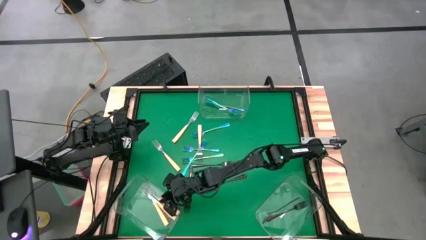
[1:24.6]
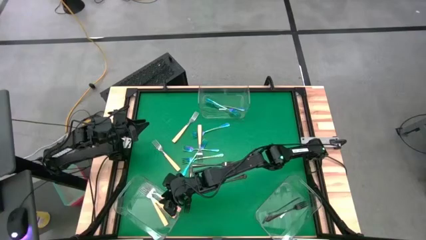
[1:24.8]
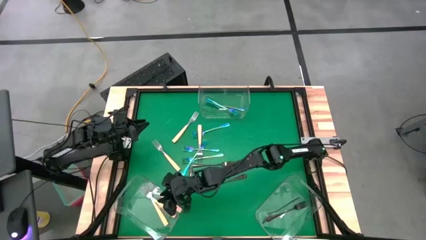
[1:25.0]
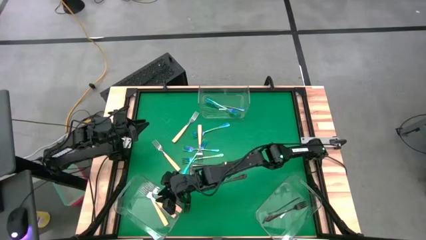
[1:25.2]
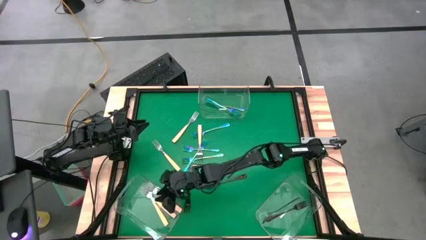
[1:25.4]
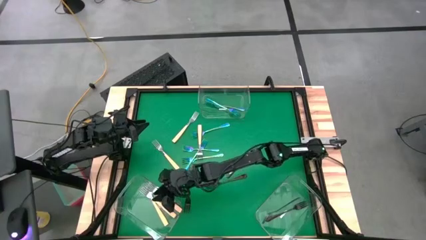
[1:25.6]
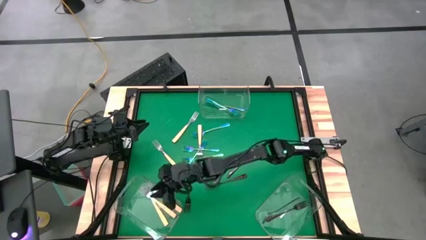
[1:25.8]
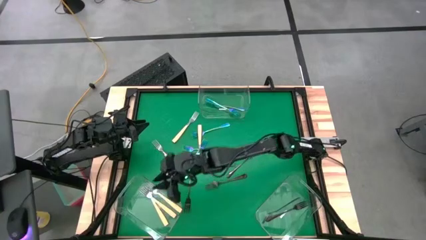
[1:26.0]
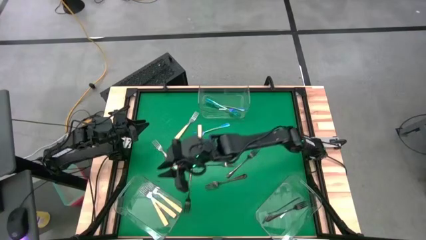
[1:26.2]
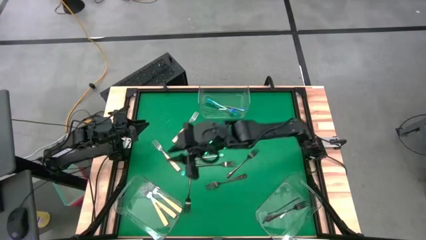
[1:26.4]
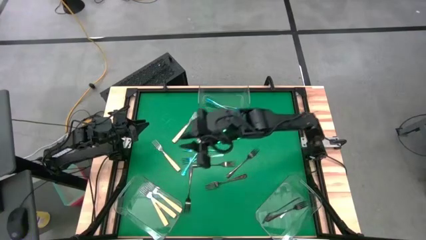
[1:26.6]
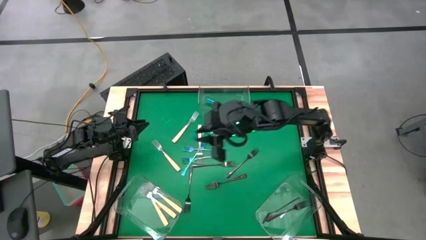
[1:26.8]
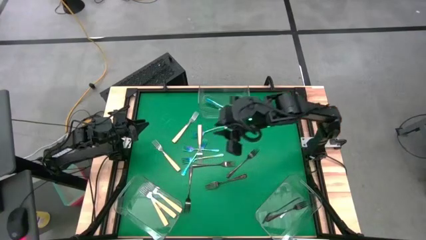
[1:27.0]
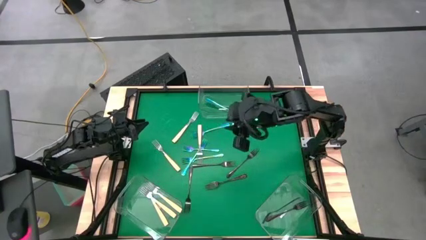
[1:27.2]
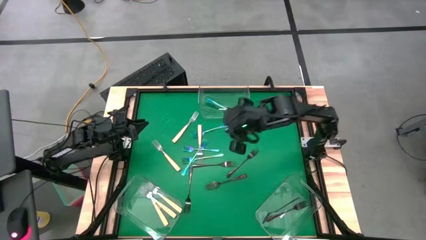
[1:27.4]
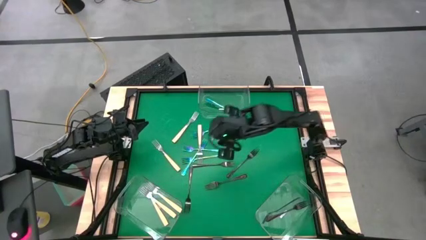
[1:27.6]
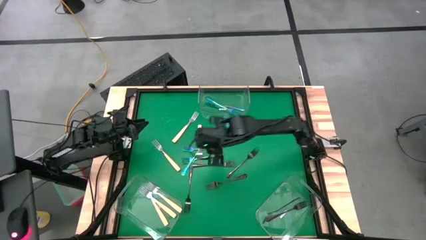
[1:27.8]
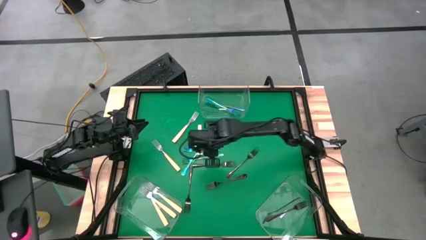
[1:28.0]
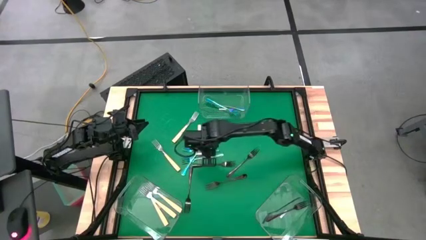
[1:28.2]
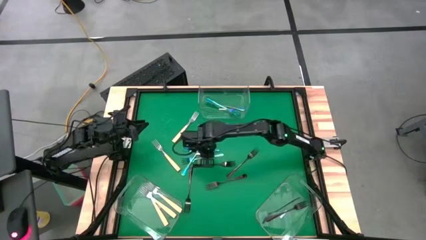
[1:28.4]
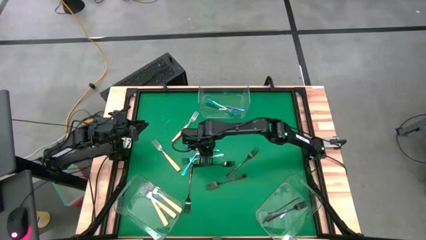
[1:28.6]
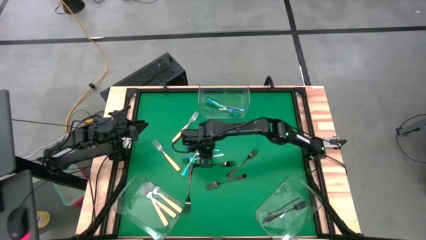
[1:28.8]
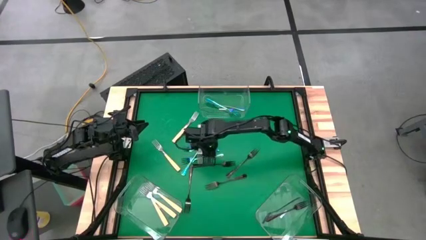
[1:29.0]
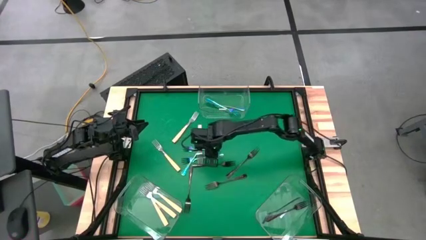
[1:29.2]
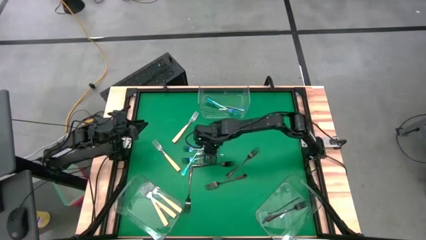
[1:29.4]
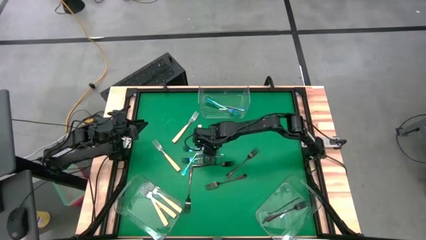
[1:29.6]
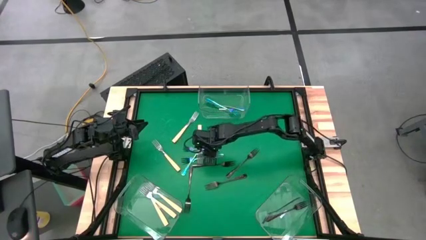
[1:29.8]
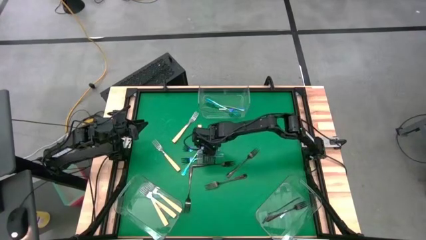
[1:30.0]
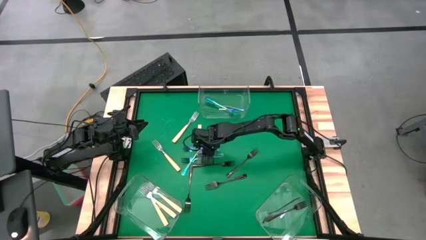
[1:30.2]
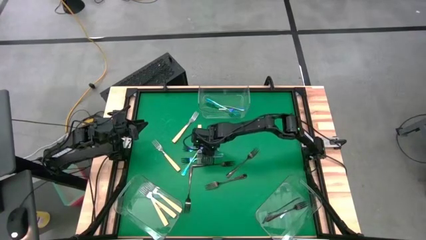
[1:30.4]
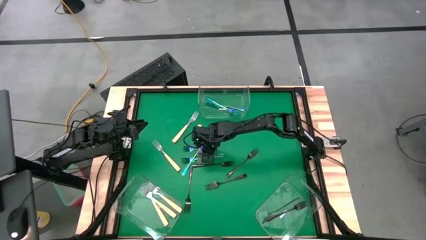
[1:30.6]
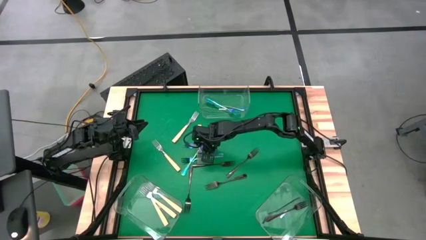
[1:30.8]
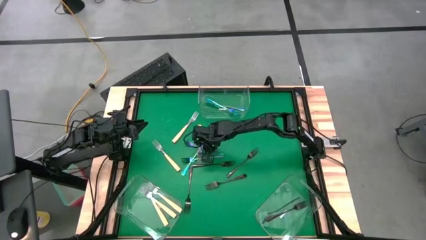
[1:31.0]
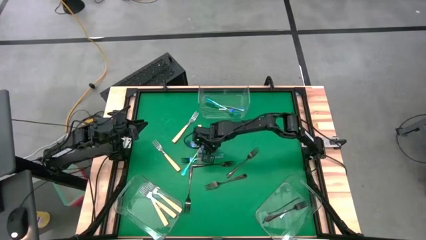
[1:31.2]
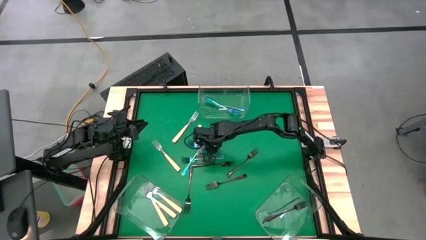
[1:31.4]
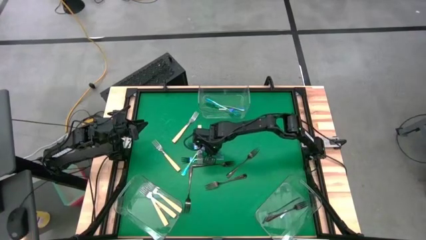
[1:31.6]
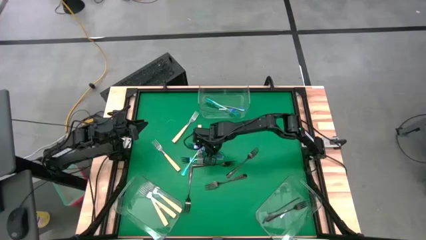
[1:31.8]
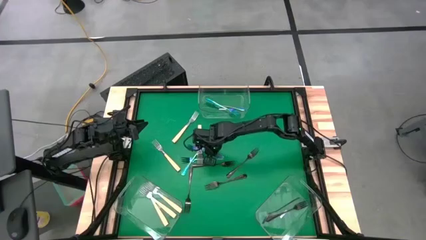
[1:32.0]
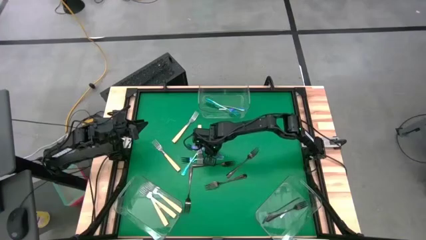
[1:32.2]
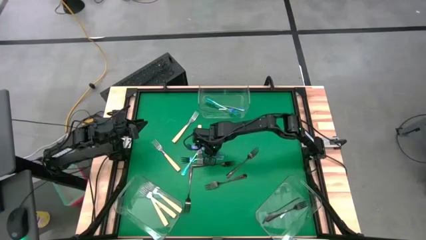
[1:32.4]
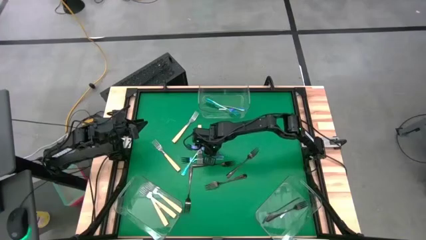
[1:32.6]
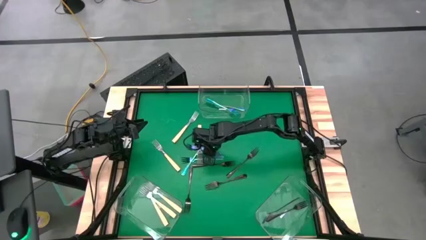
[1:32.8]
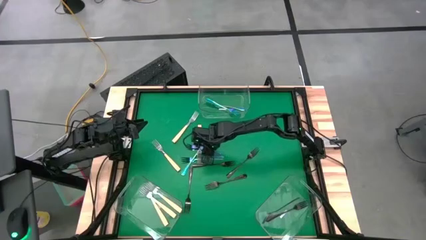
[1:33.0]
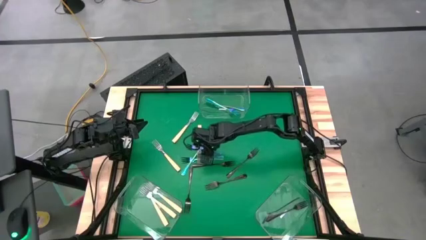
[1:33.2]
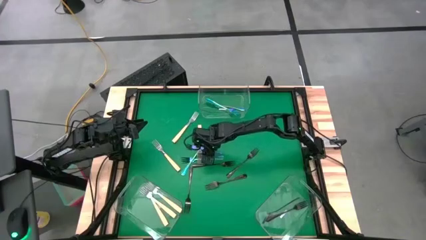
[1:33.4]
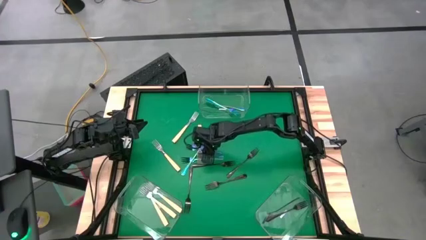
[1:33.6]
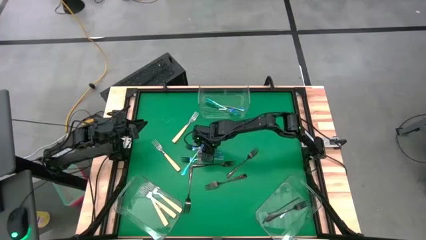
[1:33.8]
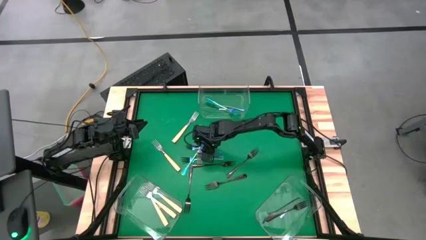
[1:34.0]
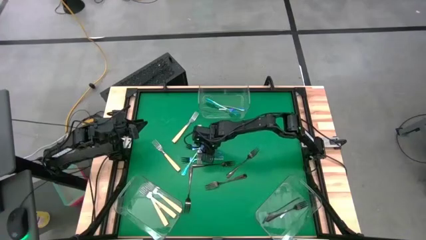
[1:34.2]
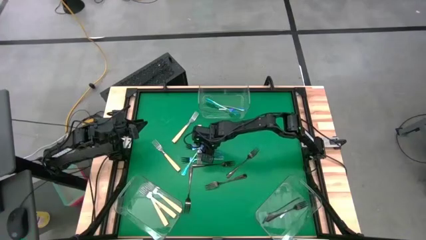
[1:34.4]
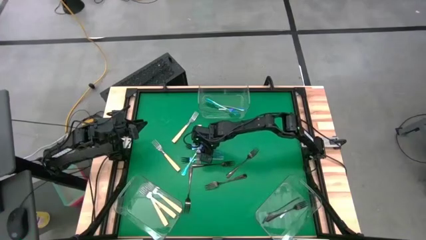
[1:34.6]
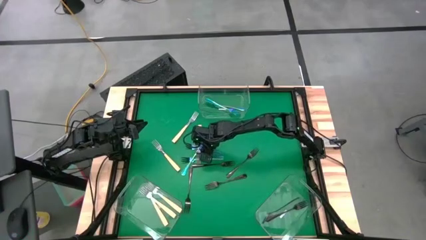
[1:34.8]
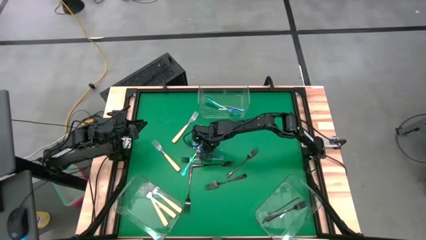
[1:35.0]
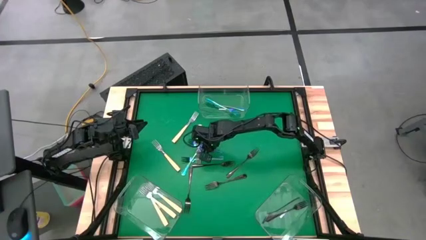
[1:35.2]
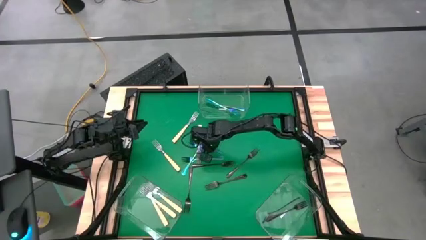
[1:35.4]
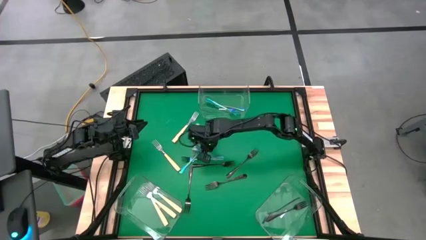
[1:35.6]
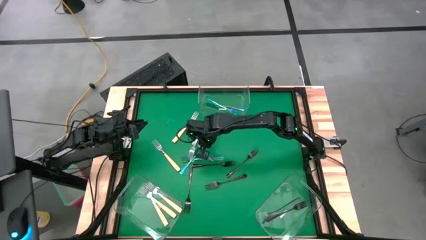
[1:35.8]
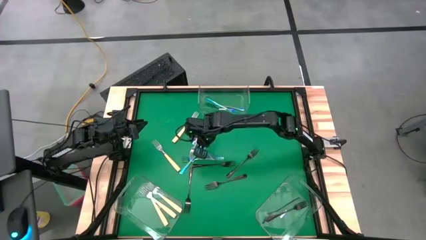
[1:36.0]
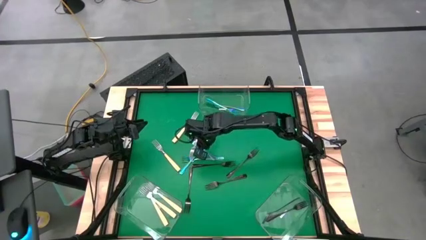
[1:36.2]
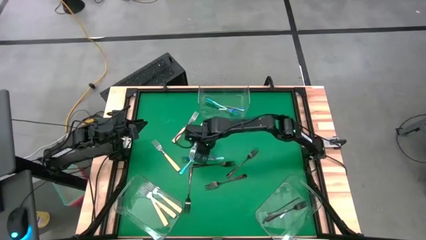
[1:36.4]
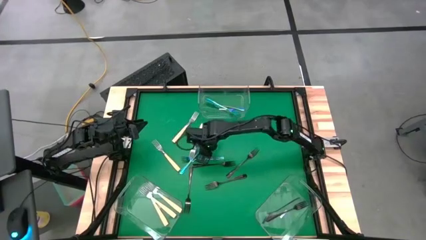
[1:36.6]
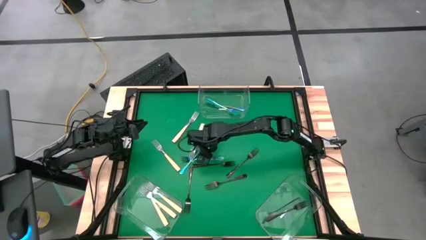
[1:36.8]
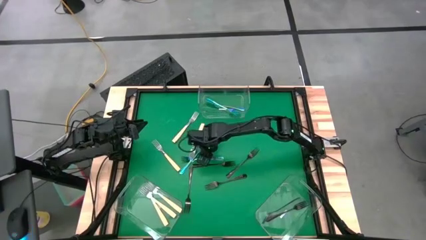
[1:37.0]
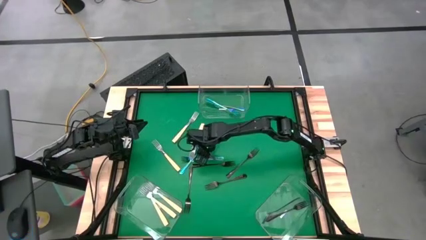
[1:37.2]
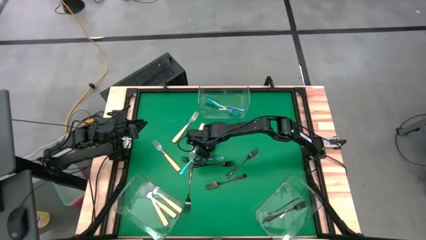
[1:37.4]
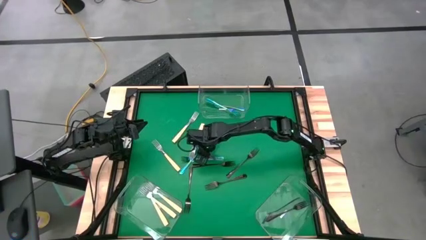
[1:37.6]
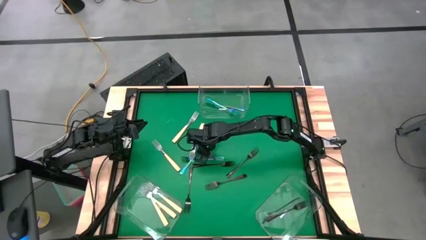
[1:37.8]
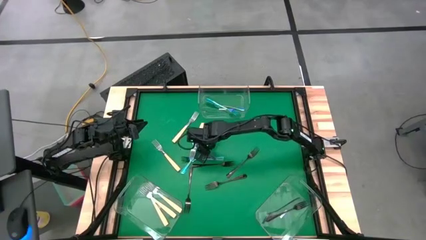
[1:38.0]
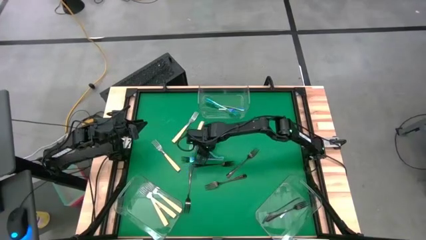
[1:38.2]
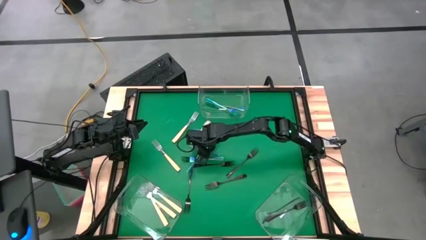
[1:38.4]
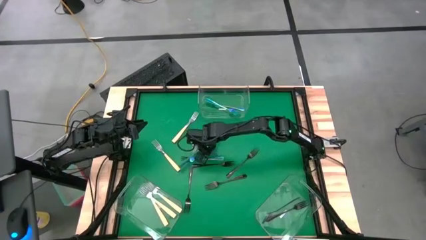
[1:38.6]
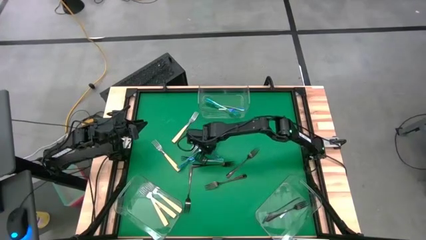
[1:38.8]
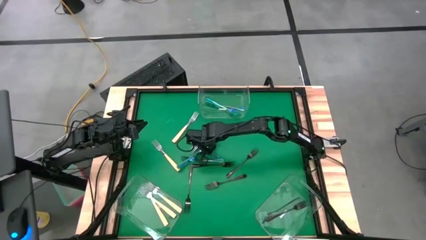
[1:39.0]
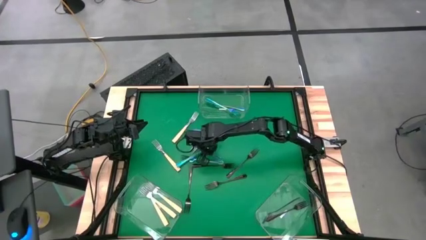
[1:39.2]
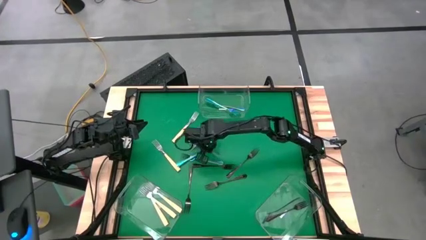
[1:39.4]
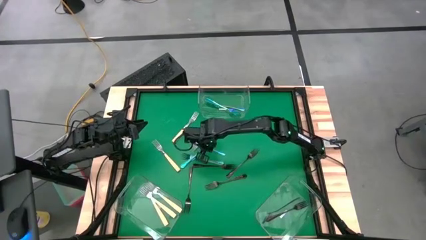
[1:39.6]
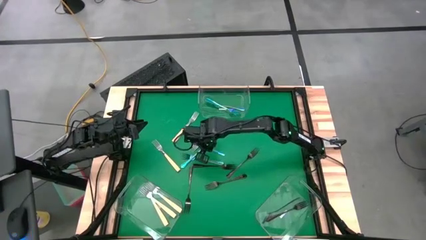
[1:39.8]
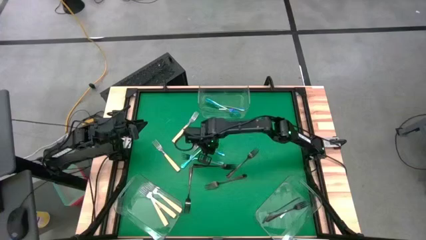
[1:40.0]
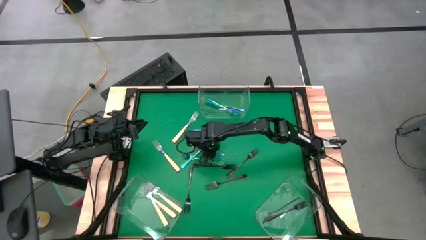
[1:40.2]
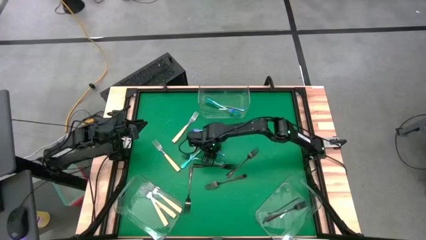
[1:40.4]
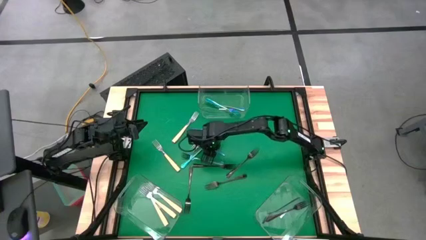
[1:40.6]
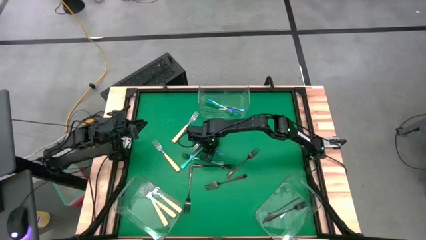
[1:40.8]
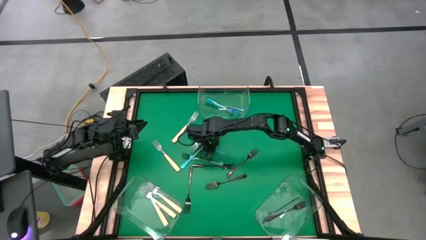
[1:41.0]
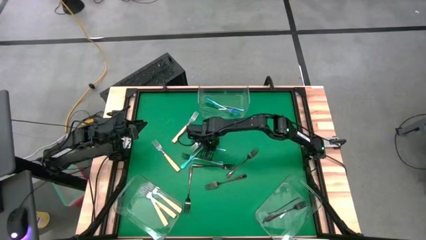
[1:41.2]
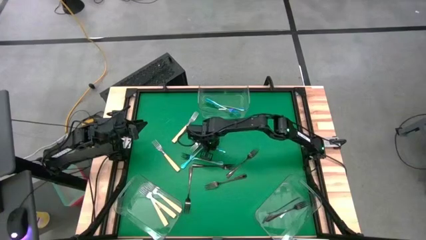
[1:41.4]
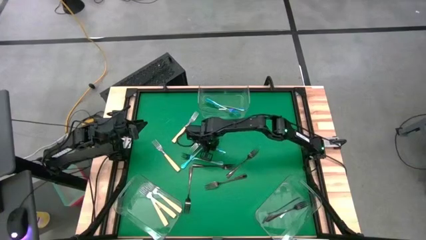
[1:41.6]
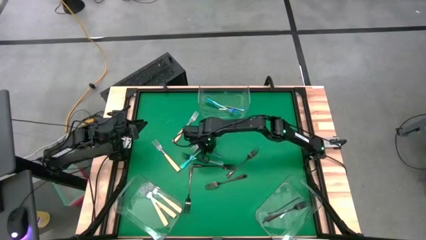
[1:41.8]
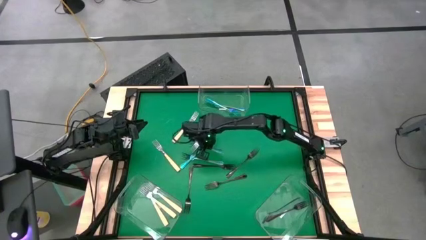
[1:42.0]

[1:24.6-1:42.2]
Task: Sort silverware by color (type)
Put the blue fork into the top transparent bin
